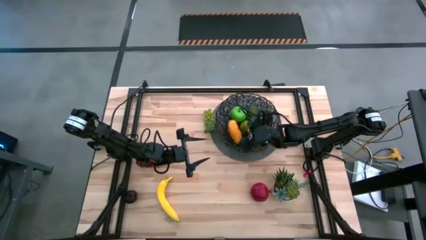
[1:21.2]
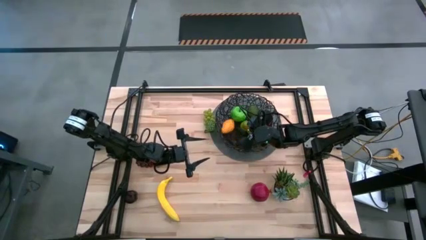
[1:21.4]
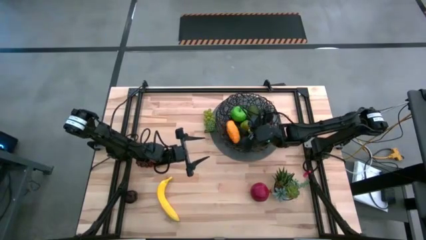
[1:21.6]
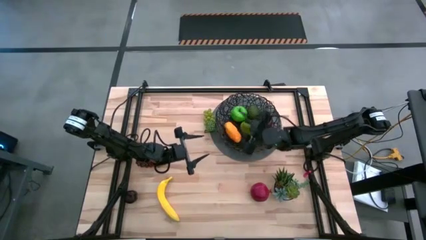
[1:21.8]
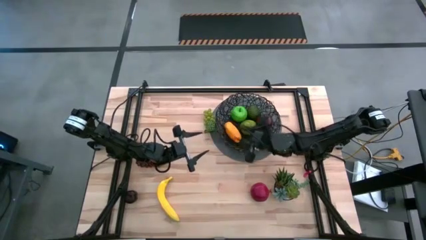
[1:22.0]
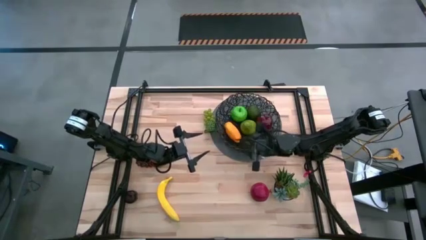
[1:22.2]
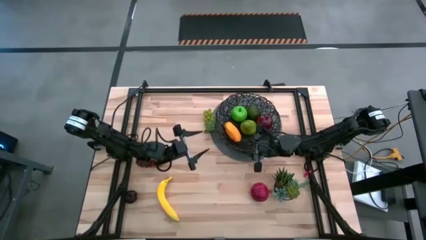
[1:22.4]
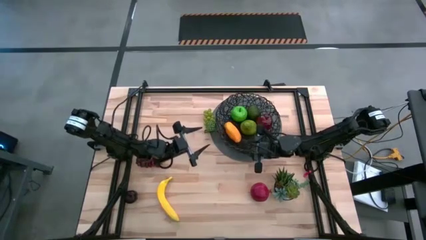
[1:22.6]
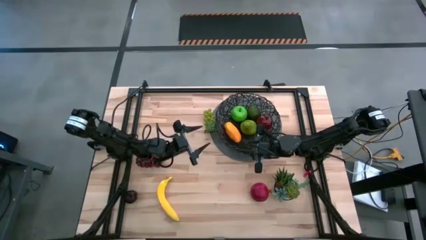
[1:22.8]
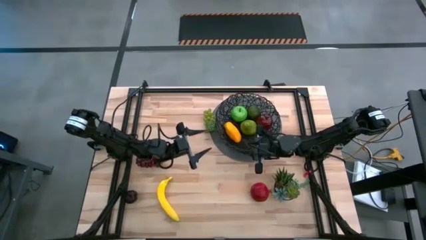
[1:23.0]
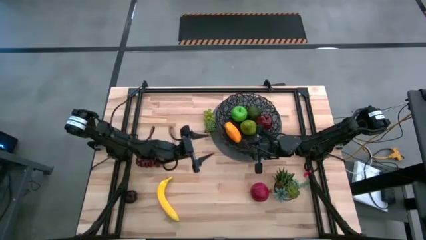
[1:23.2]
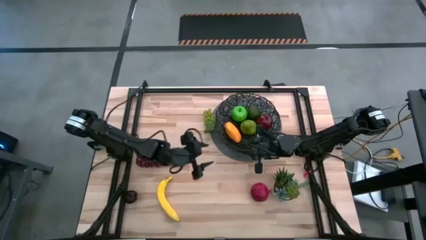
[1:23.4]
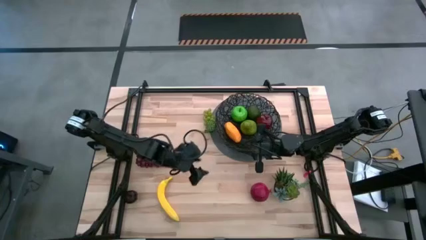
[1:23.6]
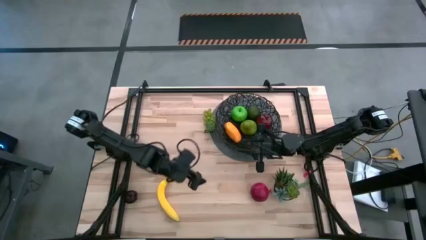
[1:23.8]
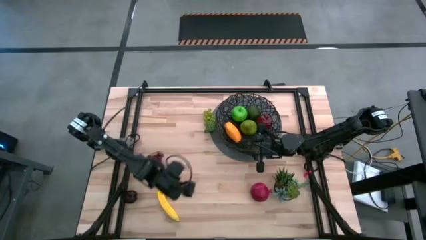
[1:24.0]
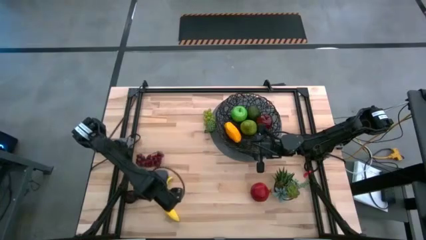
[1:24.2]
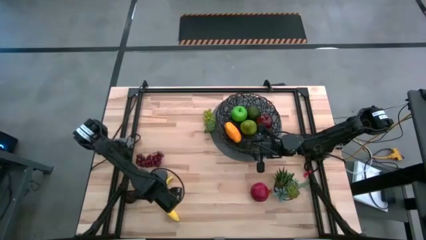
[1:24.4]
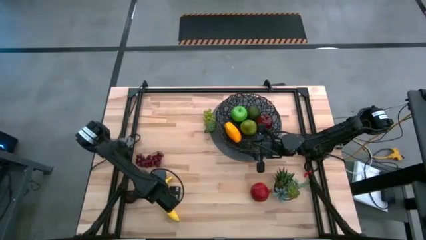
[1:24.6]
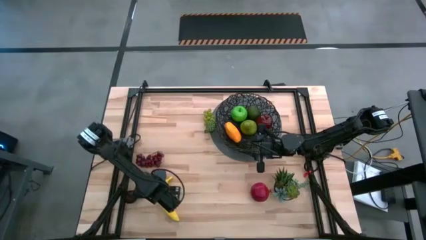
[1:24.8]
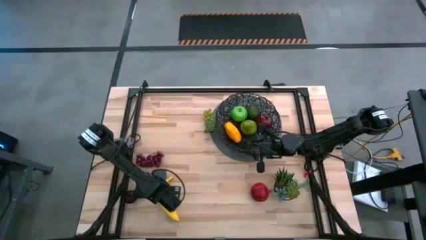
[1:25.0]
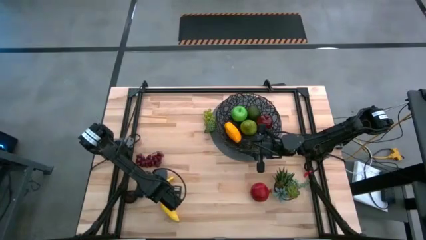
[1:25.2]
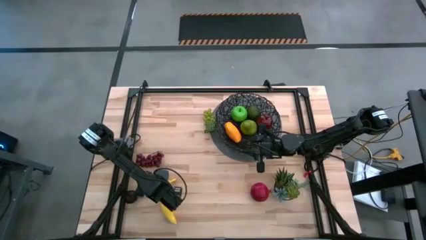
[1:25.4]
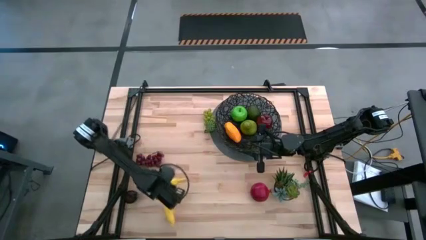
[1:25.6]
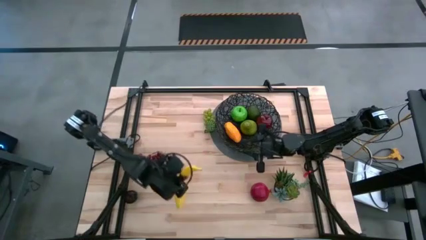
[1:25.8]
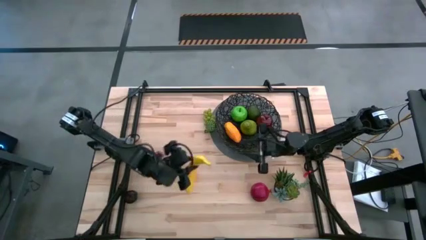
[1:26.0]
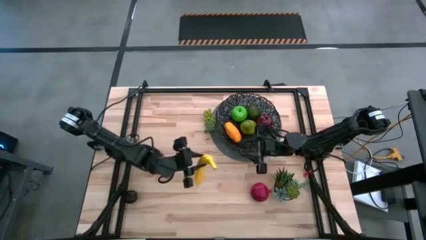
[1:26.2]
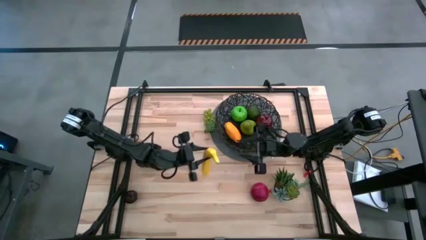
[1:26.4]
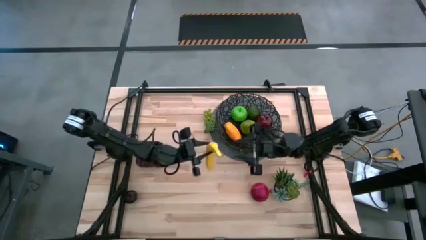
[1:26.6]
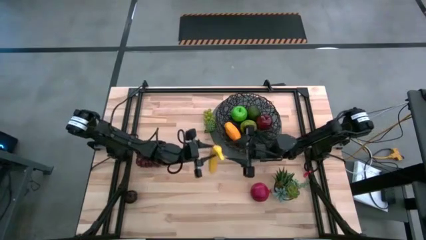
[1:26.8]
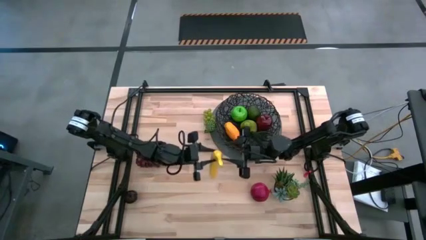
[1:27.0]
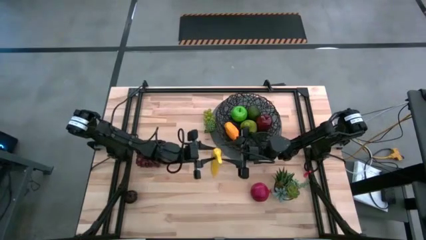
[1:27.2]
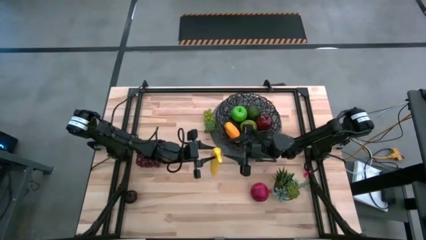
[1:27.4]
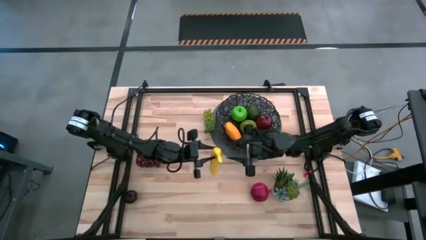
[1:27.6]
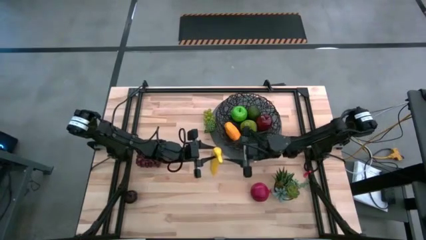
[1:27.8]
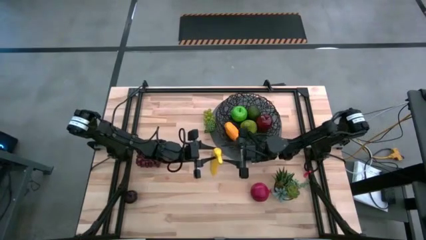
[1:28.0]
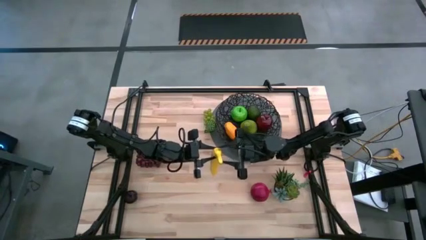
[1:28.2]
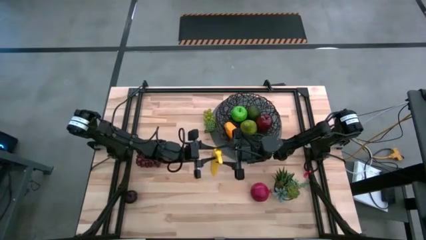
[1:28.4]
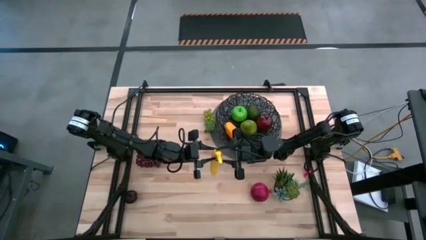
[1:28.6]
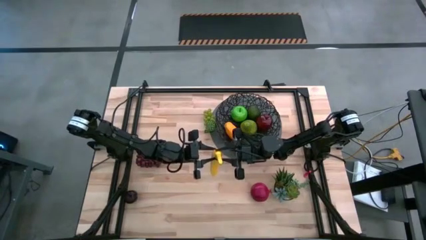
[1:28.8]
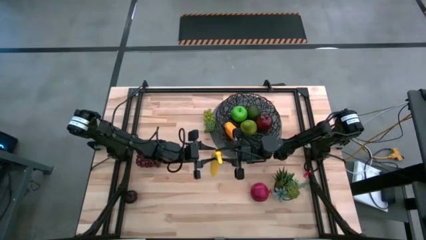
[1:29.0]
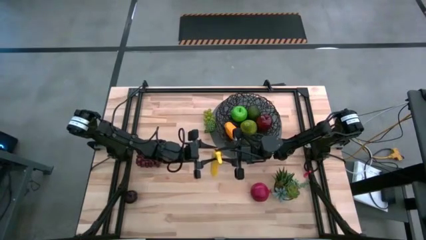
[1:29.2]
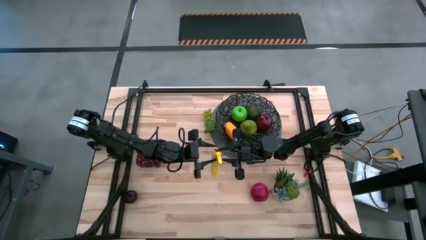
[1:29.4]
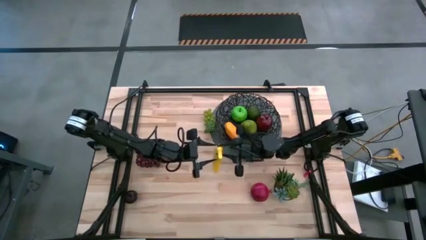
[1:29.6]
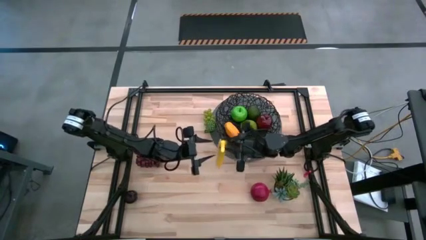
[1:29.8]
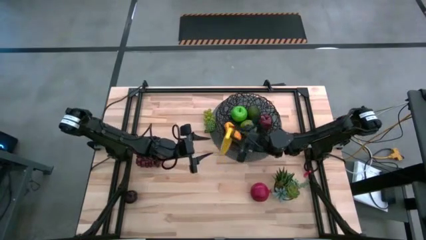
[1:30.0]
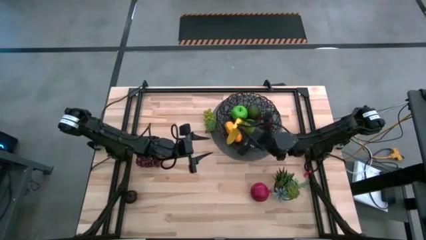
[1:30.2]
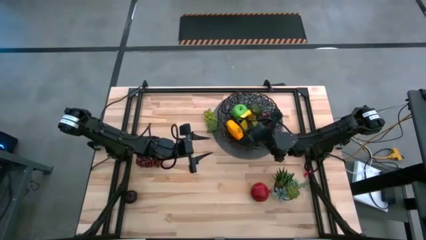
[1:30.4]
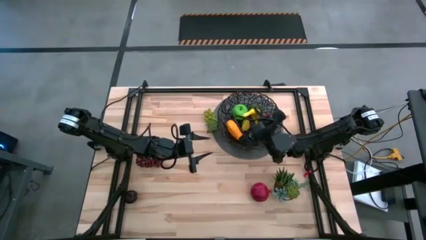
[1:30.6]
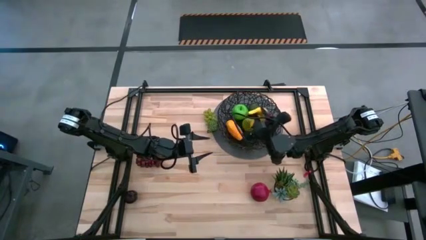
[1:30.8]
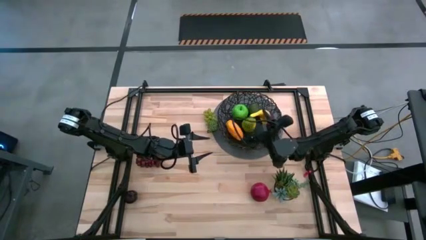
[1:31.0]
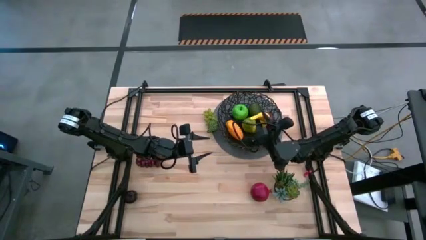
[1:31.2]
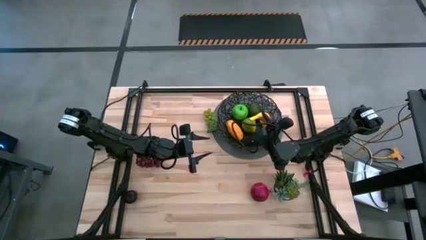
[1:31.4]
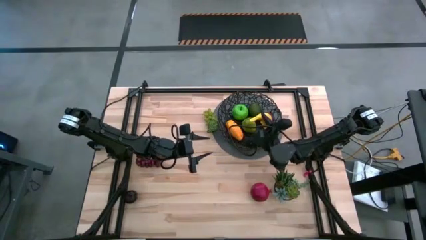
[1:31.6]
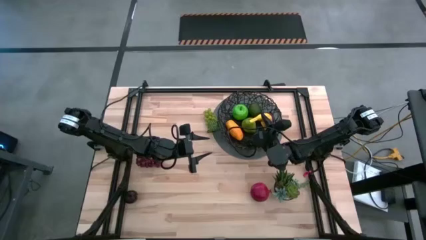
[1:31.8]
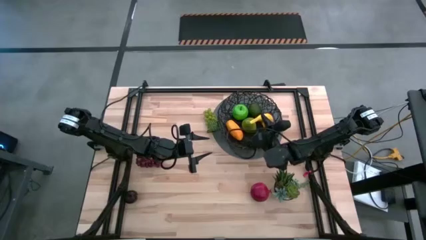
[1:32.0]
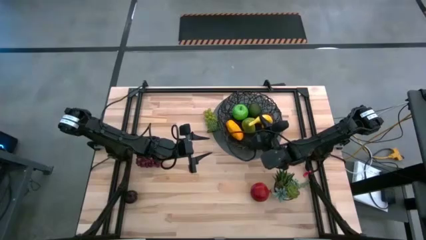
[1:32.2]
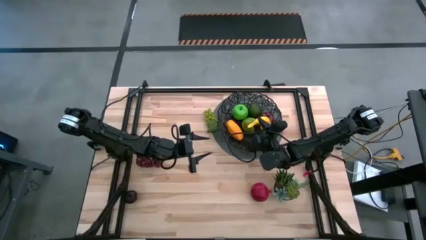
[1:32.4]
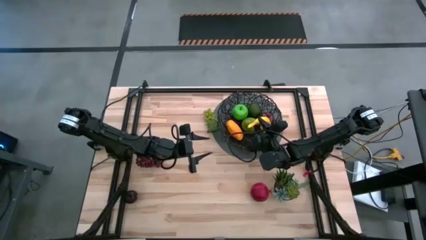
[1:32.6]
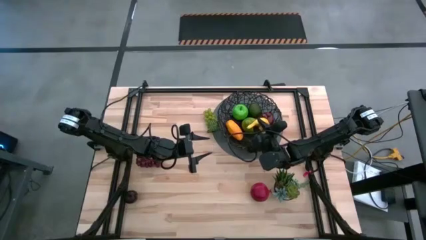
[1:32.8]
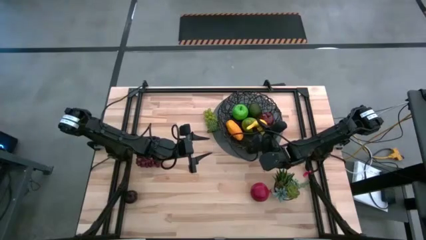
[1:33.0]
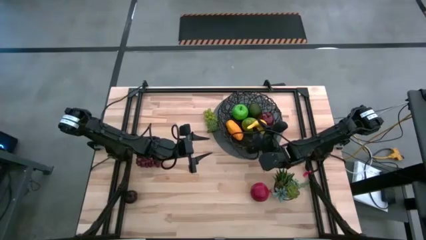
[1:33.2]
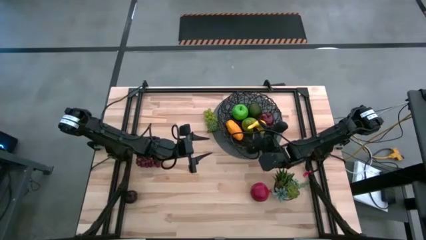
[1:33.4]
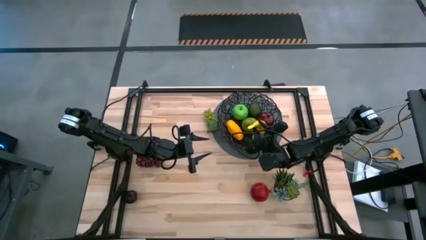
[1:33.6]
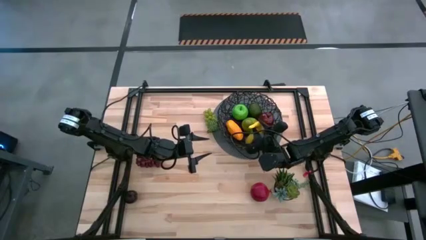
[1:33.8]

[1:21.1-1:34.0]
Task: Build produce basket
Put the banana into the wire basket
